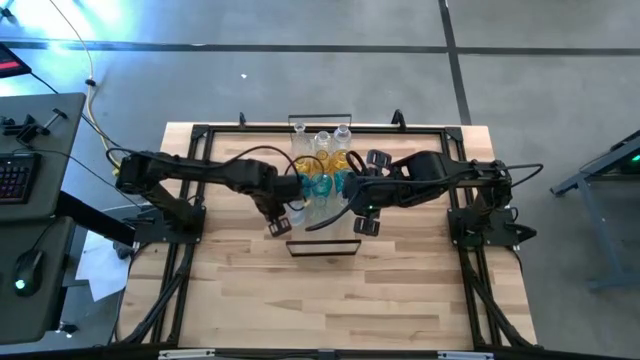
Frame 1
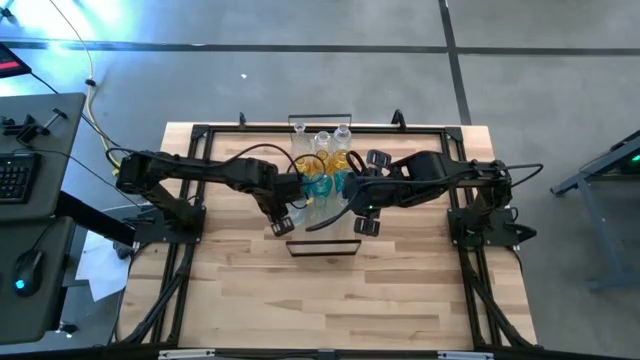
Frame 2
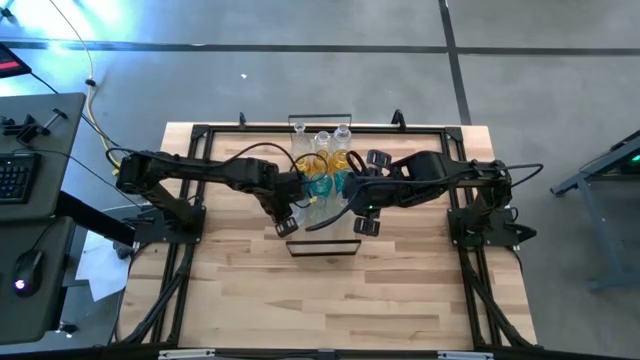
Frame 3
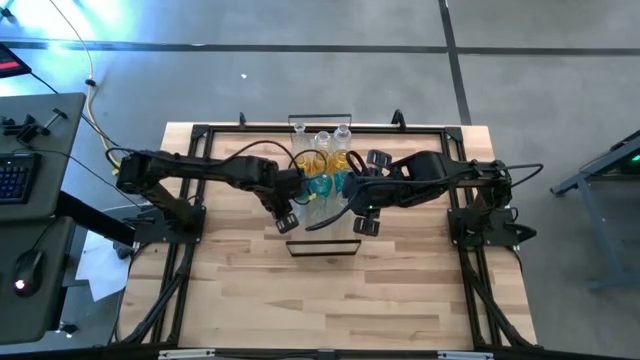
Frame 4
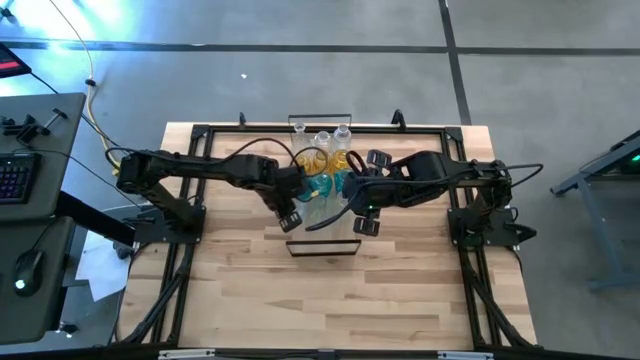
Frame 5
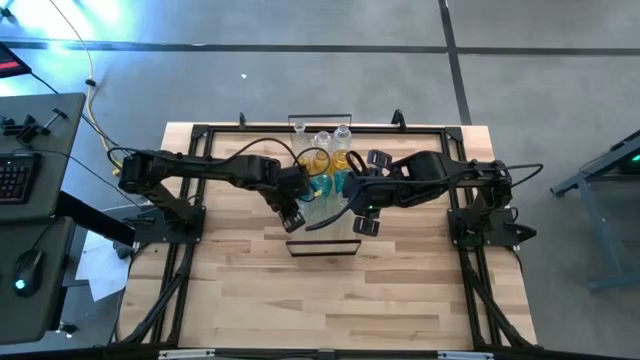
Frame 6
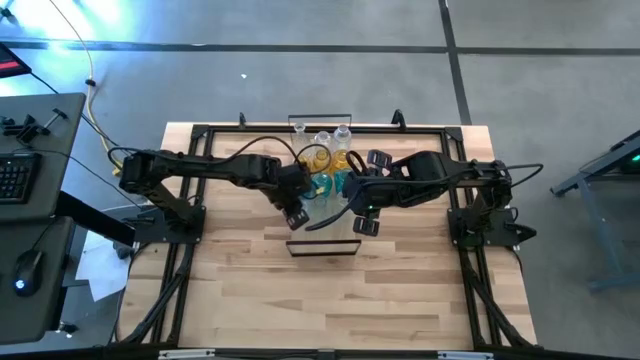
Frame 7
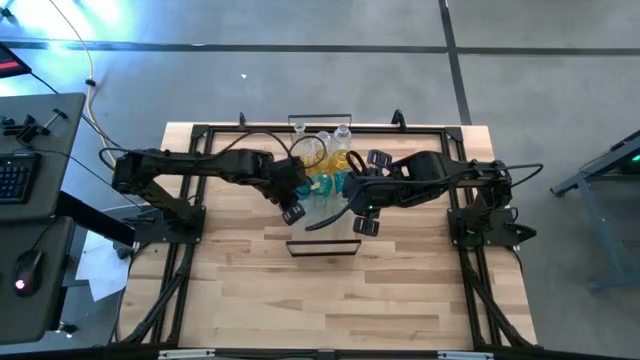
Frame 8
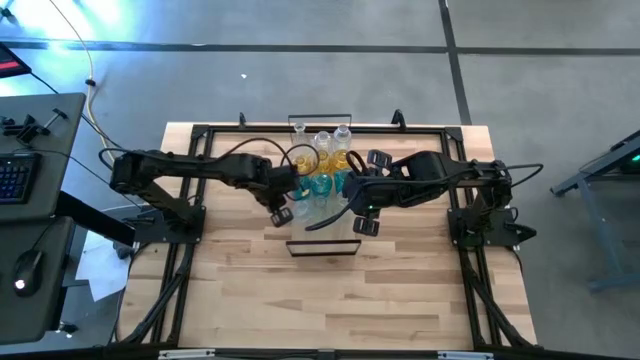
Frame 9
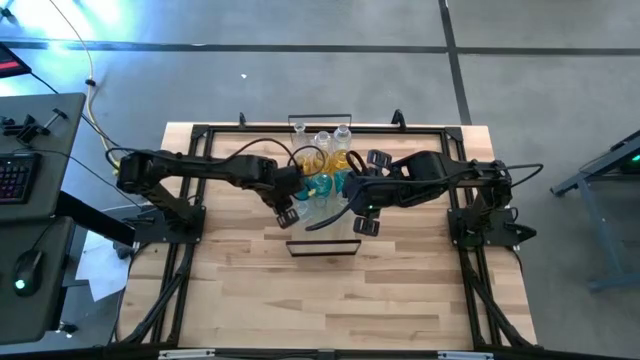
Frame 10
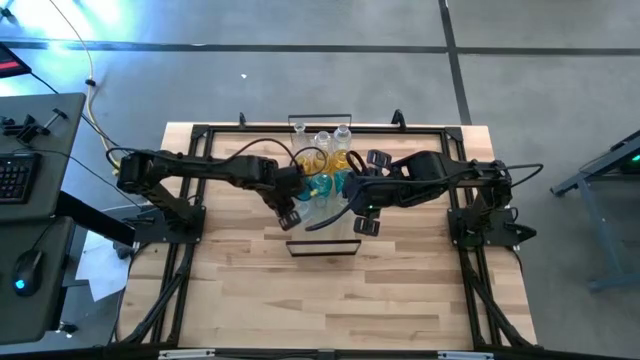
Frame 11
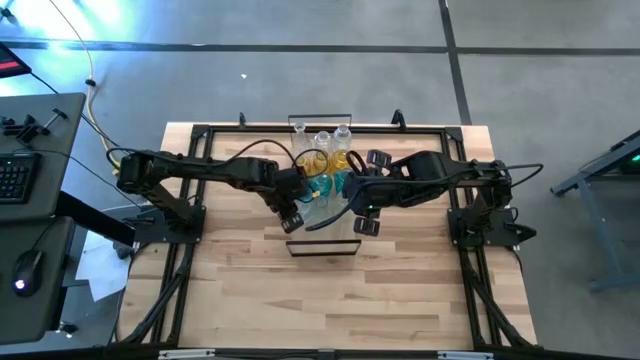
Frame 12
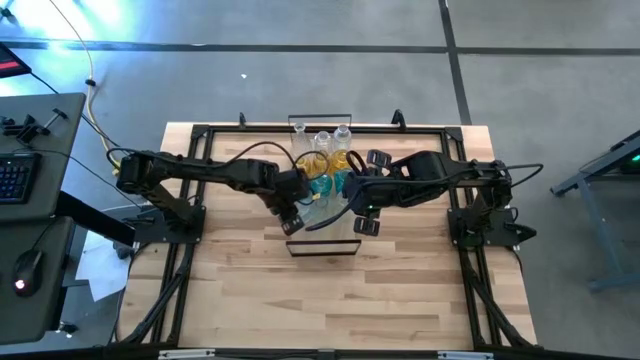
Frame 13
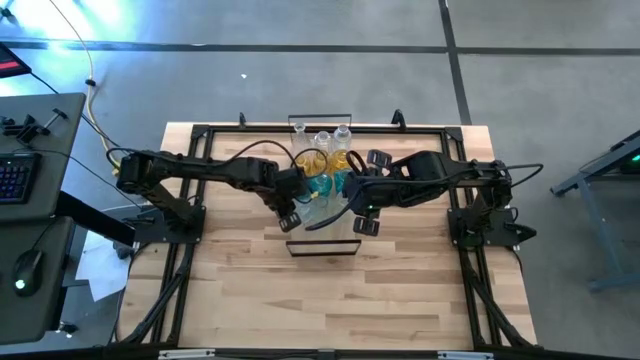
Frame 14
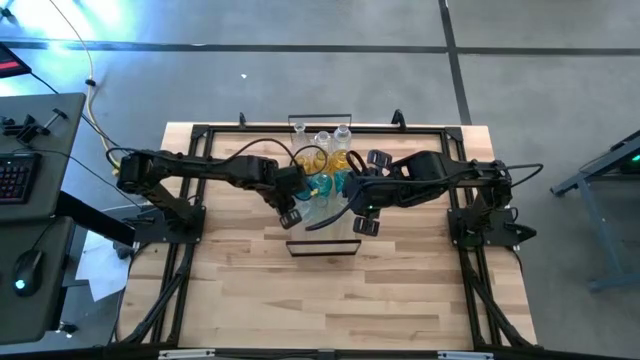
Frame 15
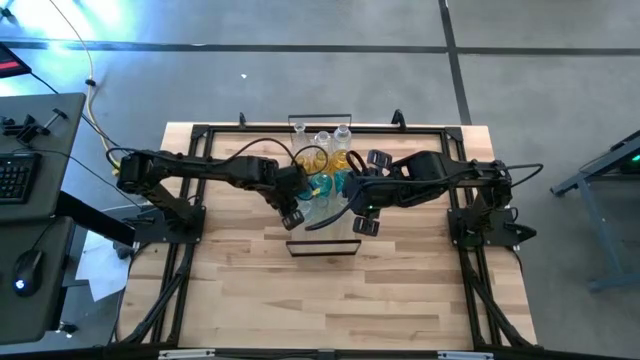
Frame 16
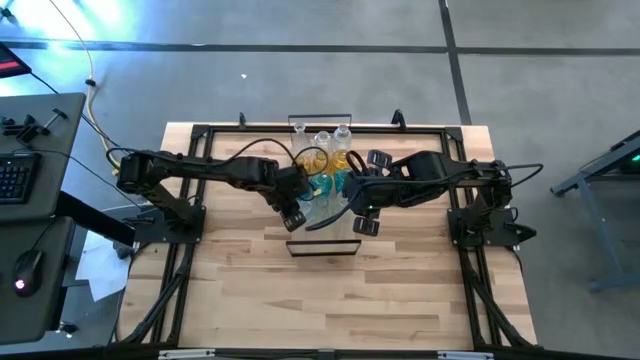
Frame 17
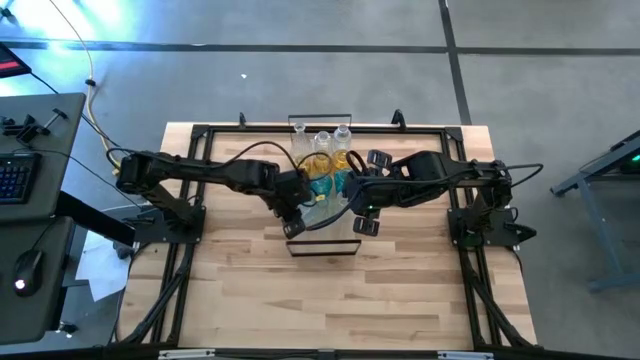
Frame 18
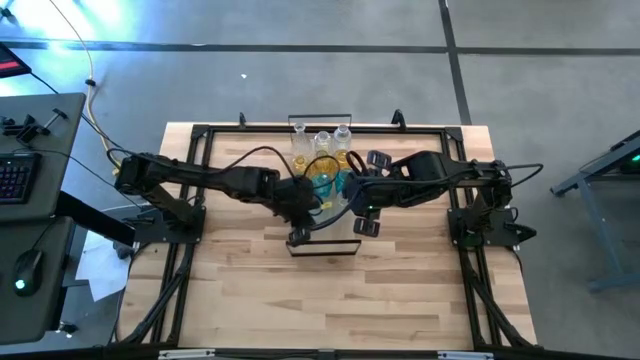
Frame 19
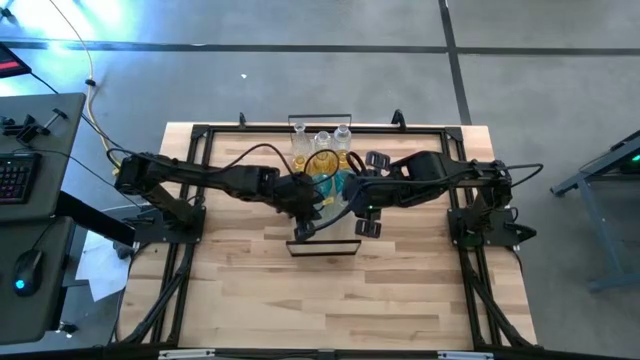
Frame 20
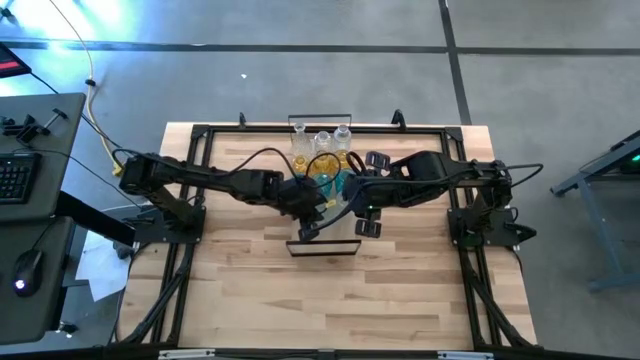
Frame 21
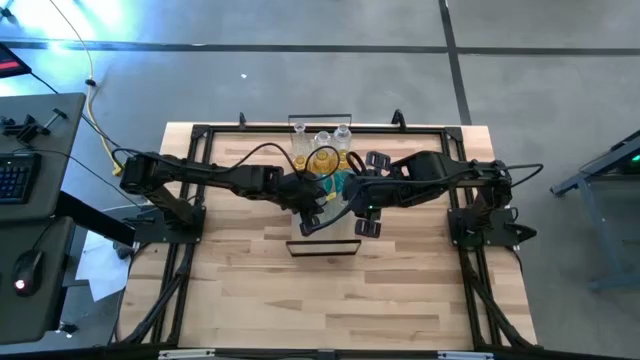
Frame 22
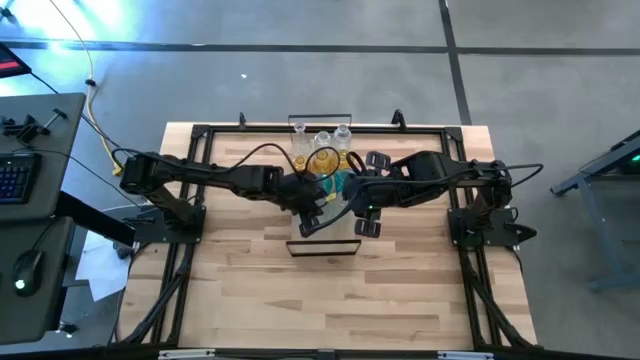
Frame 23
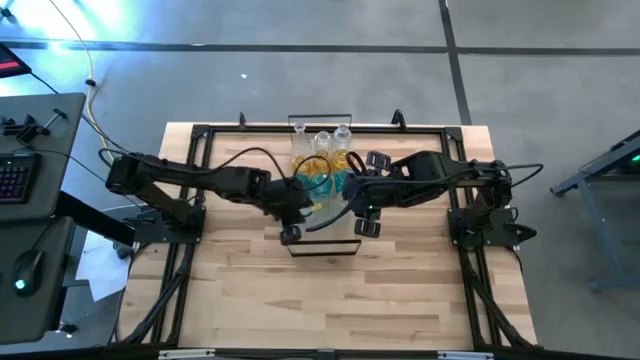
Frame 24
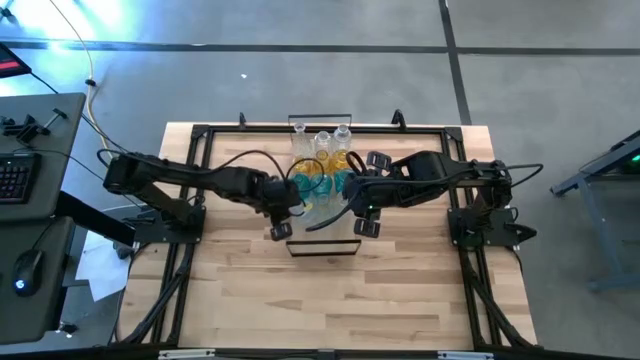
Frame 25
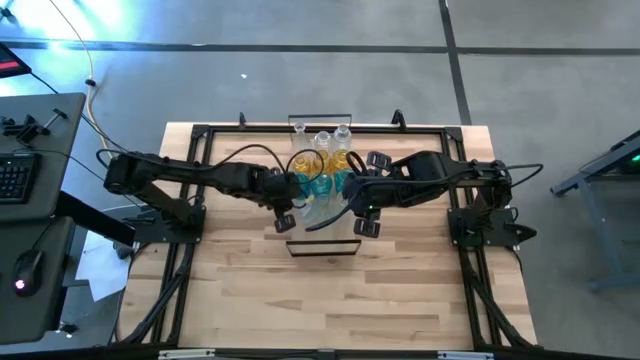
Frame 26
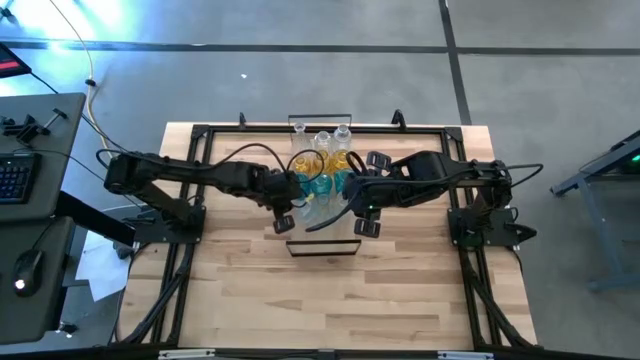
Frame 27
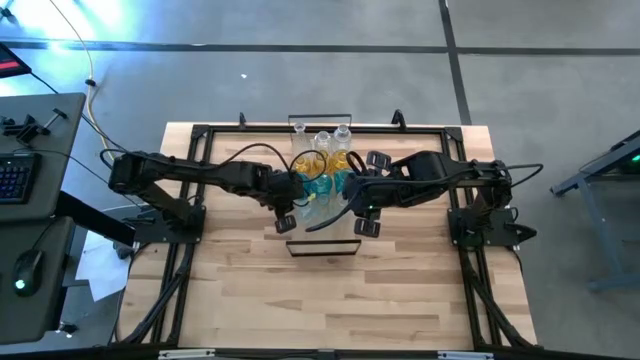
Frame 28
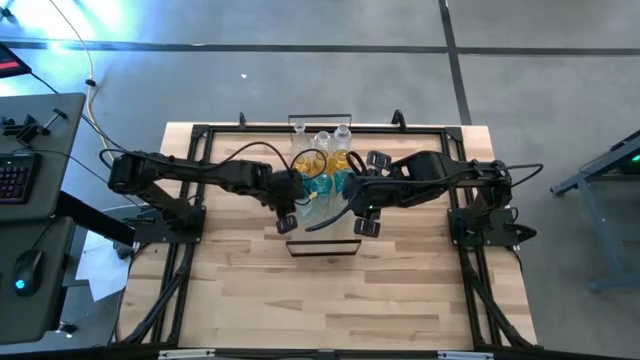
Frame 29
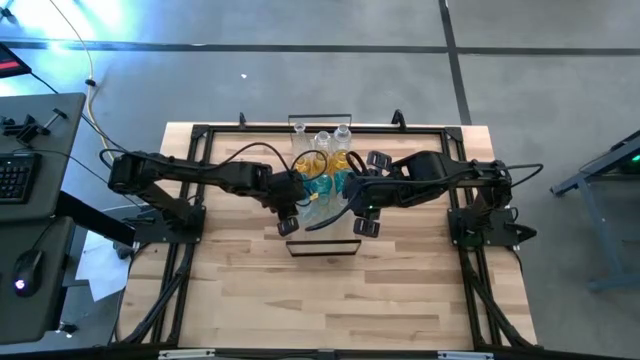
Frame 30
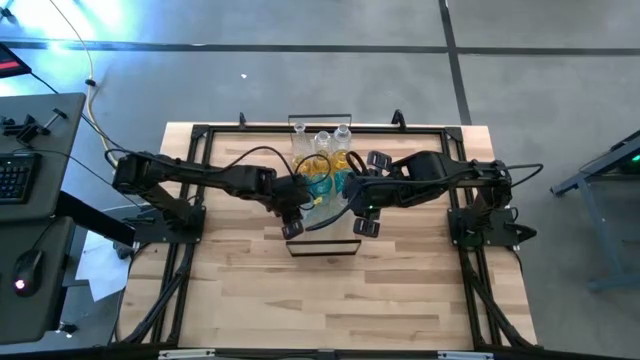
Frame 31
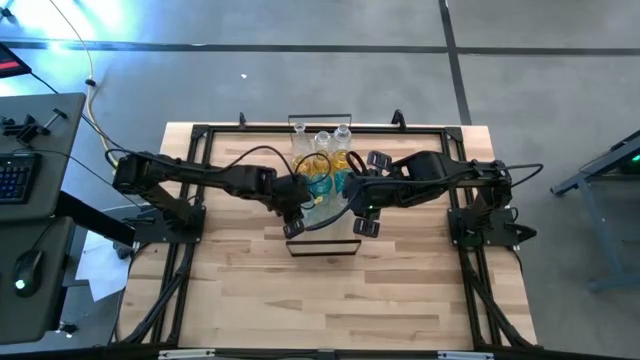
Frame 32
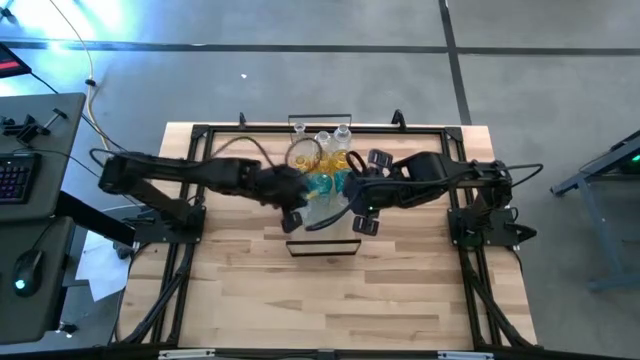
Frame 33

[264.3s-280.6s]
Task: sort vases onto shelf
Put the transparent flower vase on the shelf aligned with the other transparent flower vase

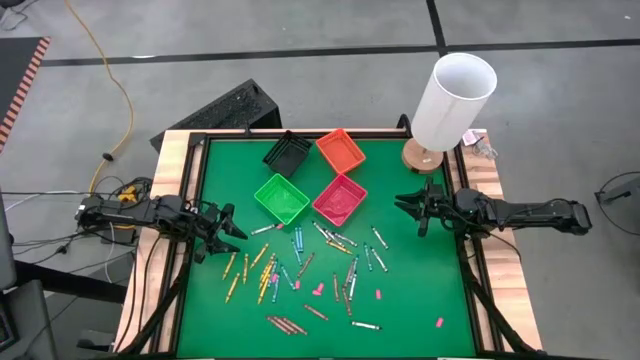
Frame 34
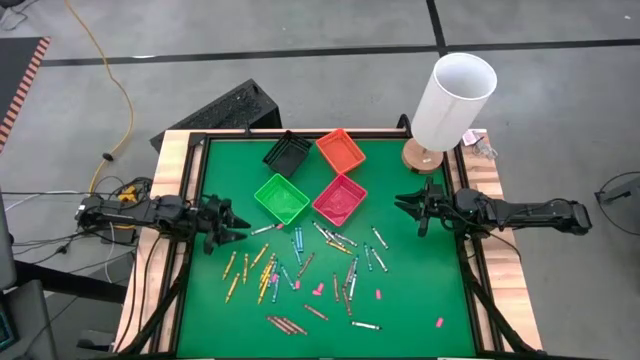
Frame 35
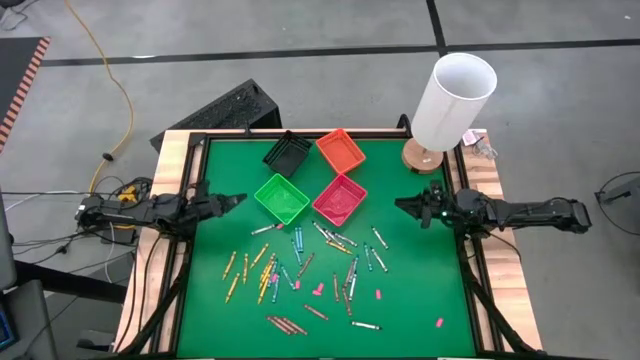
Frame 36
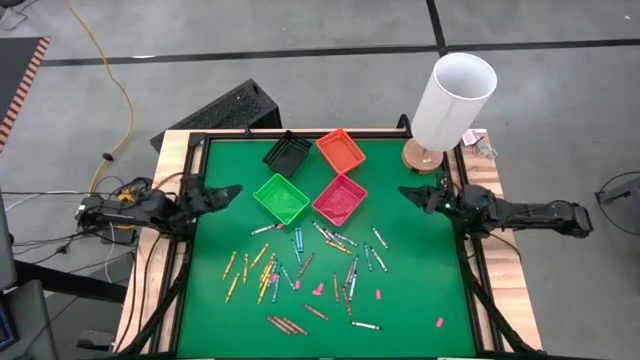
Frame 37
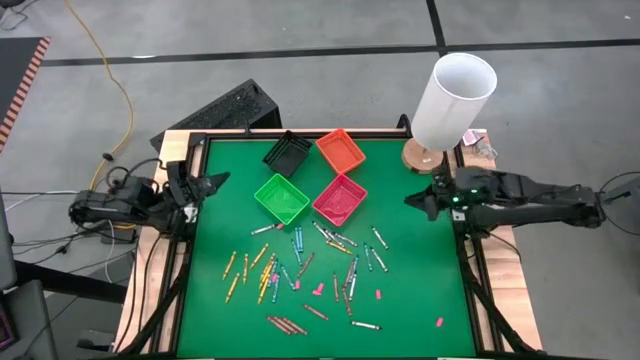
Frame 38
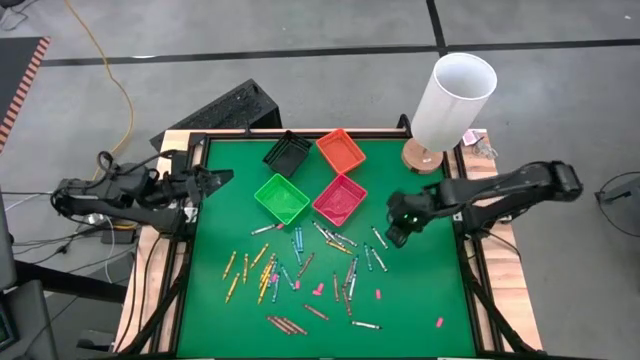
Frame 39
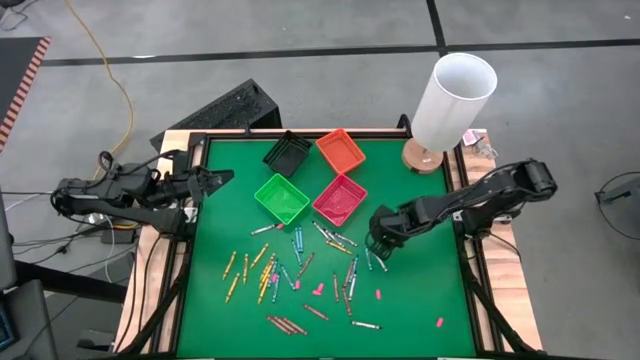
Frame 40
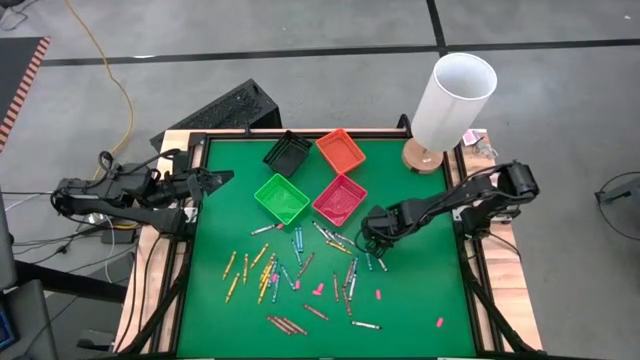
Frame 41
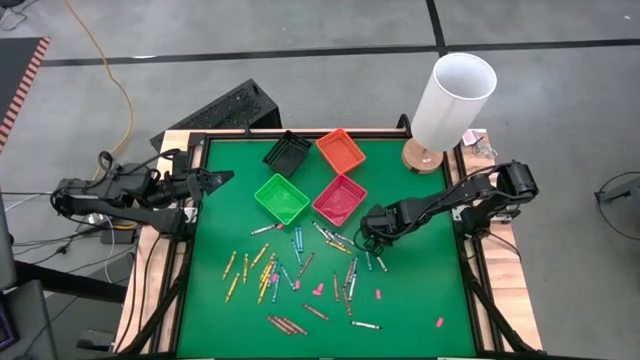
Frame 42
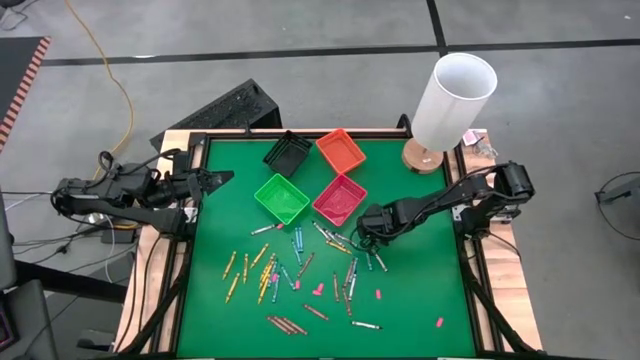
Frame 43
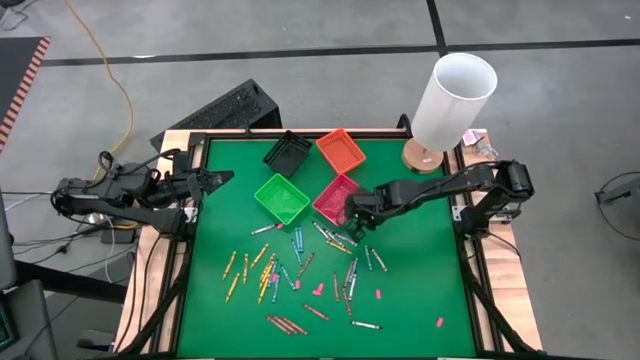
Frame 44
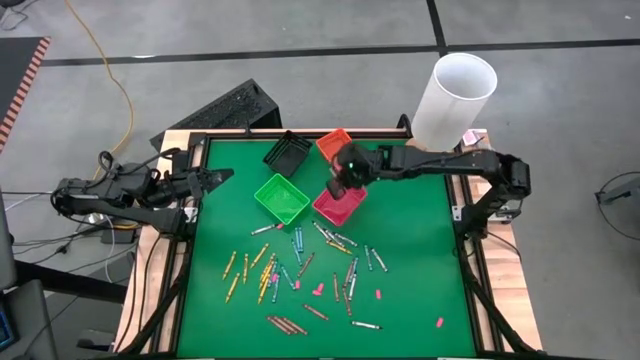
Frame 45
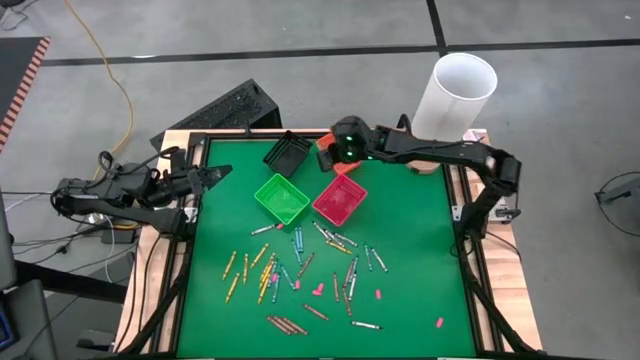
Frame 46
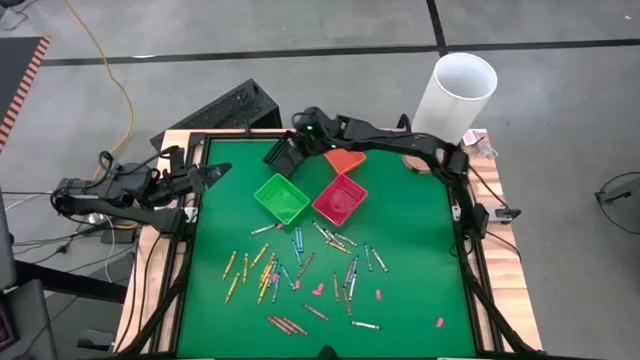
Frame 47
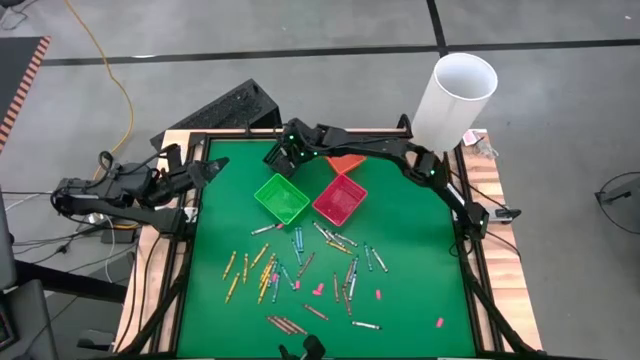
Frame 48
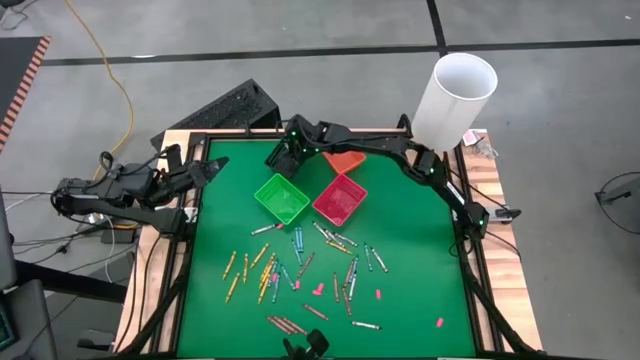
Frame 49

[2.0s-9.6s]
Task: Sort crayons
Put the black crayon into the black bin
